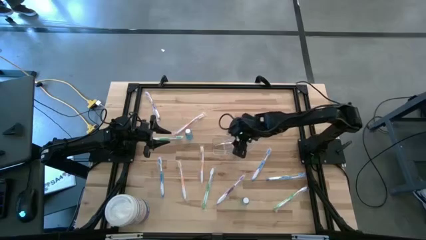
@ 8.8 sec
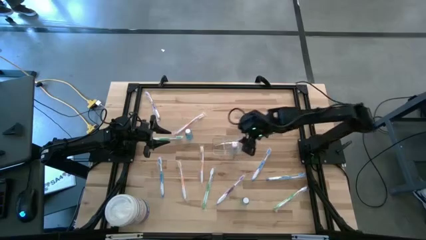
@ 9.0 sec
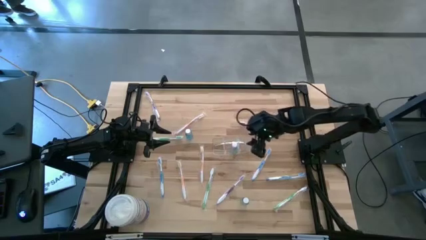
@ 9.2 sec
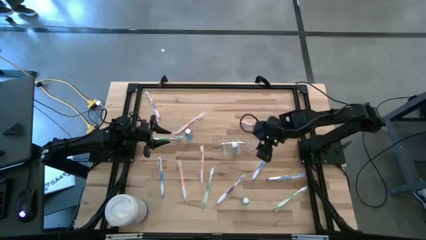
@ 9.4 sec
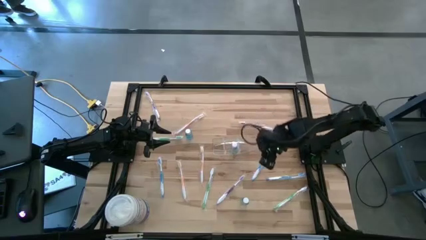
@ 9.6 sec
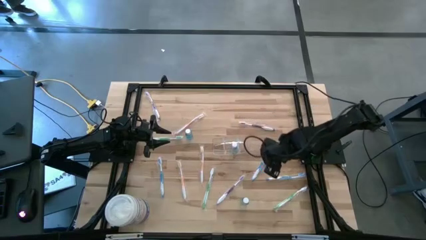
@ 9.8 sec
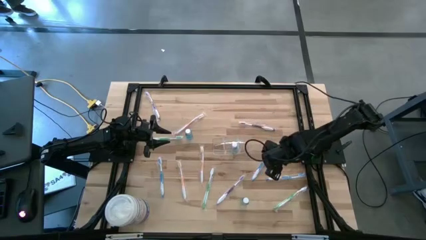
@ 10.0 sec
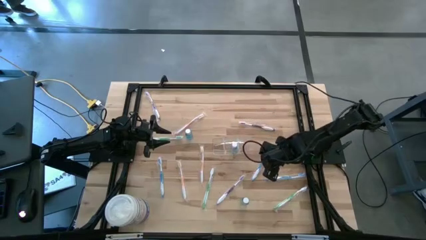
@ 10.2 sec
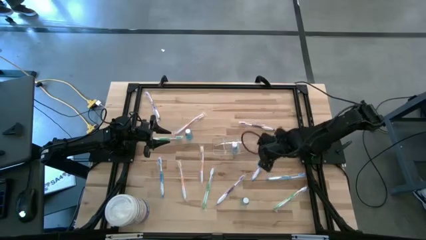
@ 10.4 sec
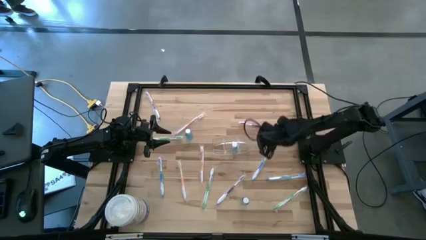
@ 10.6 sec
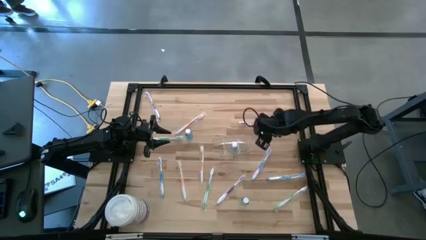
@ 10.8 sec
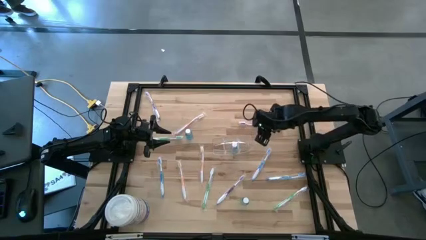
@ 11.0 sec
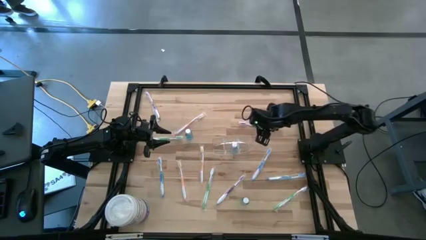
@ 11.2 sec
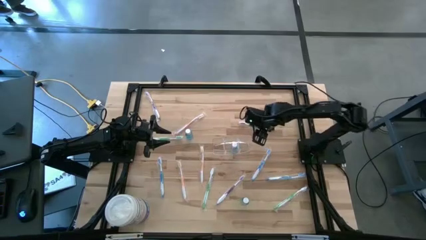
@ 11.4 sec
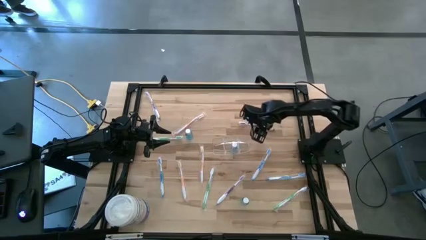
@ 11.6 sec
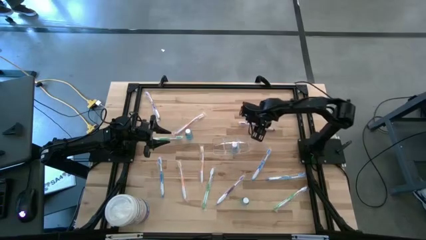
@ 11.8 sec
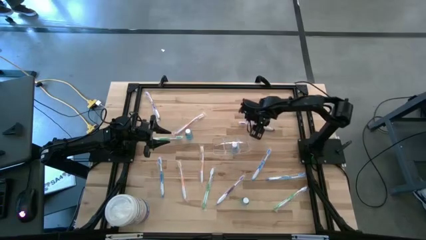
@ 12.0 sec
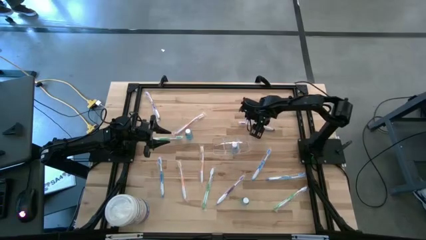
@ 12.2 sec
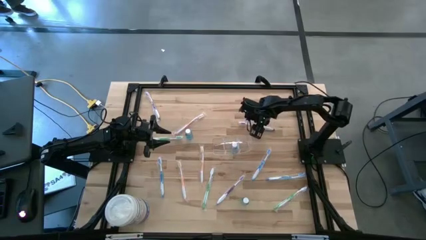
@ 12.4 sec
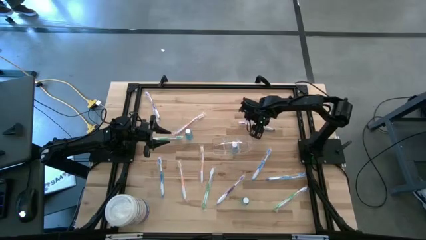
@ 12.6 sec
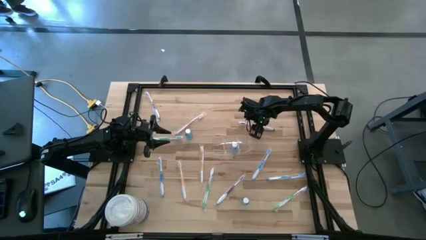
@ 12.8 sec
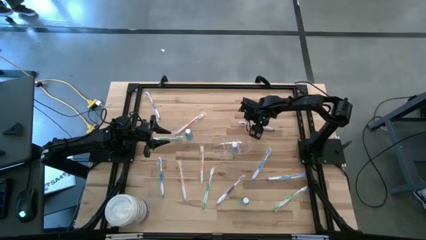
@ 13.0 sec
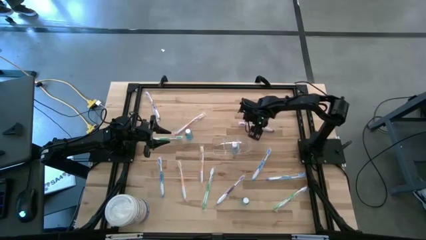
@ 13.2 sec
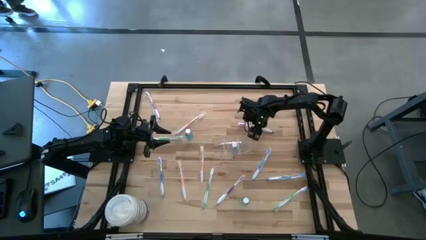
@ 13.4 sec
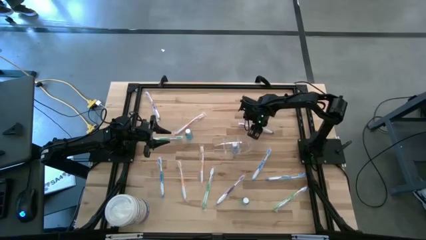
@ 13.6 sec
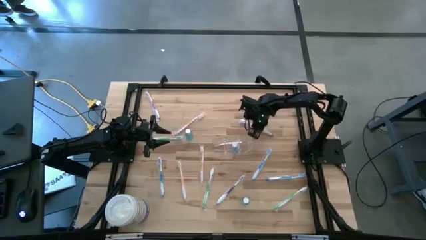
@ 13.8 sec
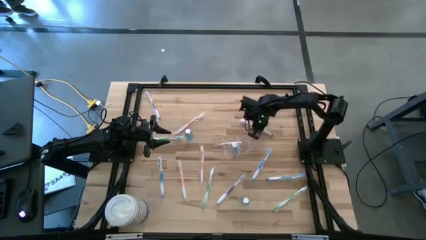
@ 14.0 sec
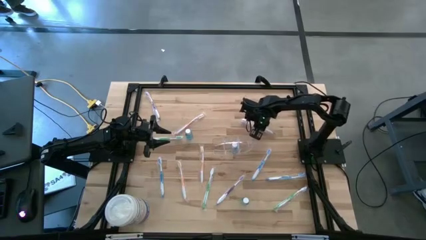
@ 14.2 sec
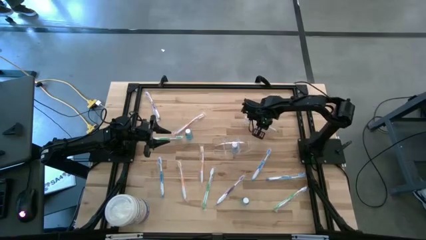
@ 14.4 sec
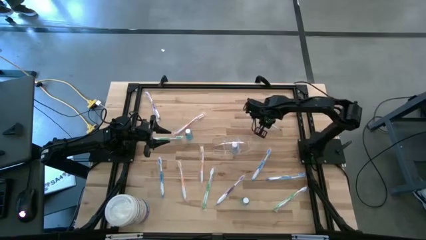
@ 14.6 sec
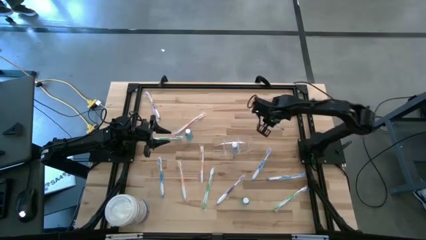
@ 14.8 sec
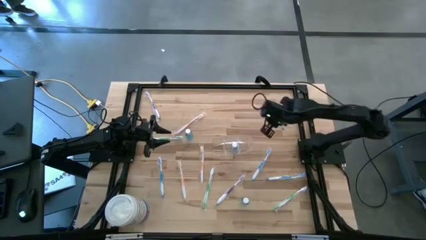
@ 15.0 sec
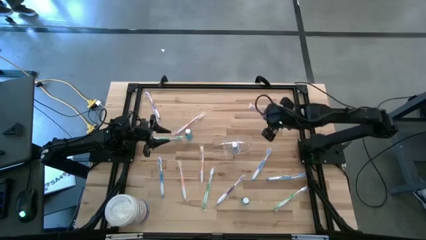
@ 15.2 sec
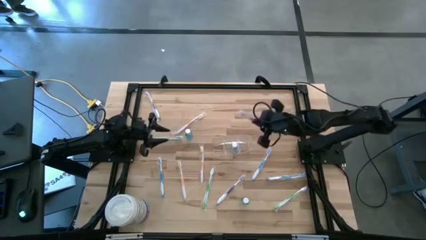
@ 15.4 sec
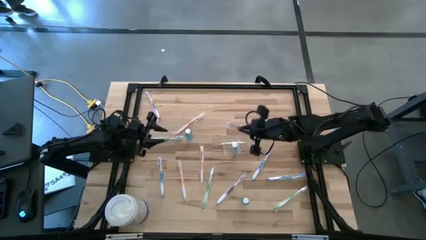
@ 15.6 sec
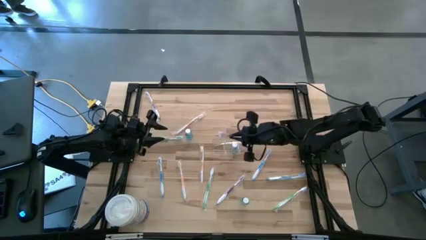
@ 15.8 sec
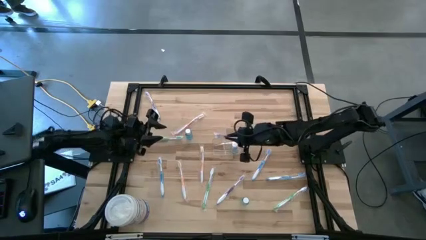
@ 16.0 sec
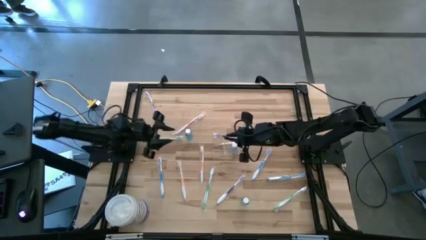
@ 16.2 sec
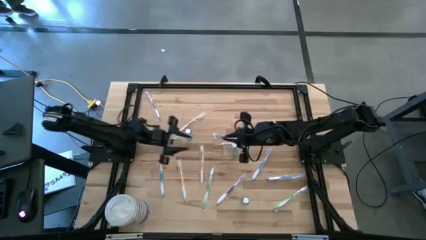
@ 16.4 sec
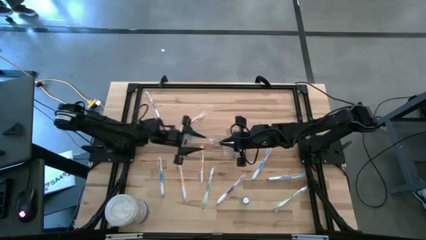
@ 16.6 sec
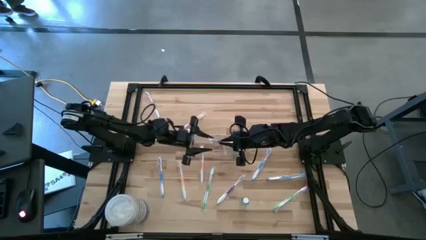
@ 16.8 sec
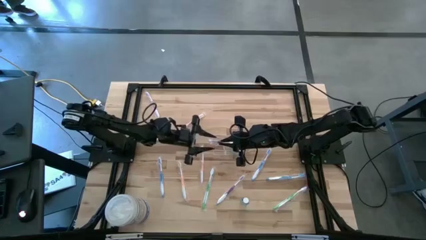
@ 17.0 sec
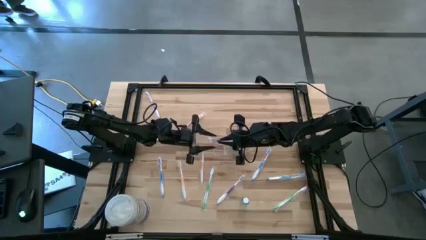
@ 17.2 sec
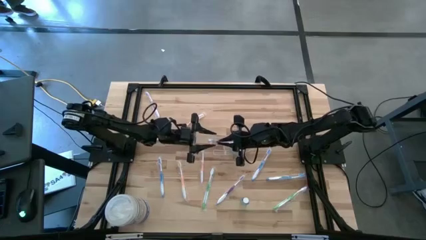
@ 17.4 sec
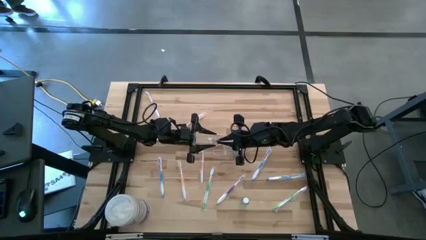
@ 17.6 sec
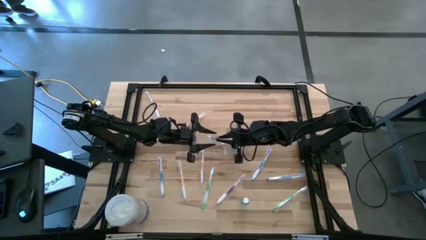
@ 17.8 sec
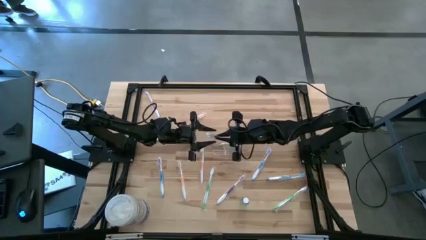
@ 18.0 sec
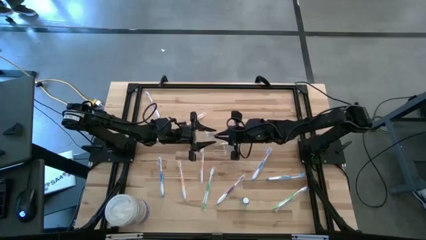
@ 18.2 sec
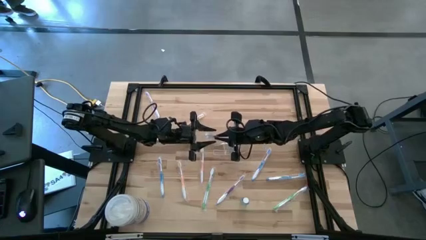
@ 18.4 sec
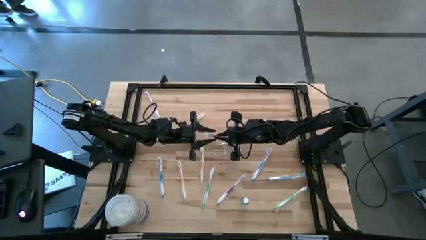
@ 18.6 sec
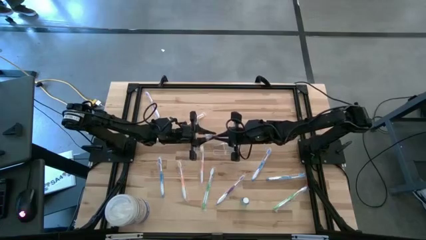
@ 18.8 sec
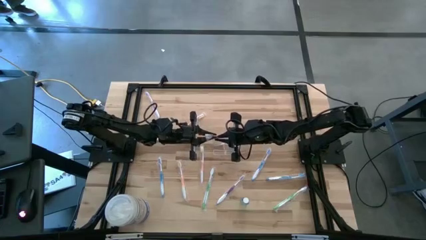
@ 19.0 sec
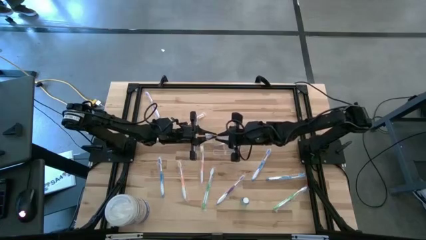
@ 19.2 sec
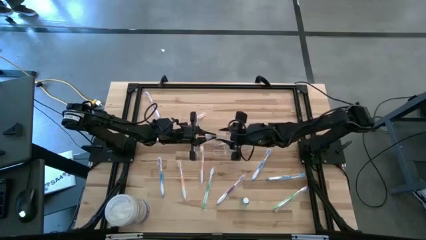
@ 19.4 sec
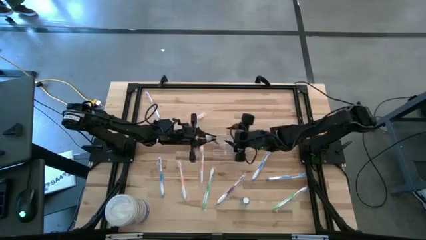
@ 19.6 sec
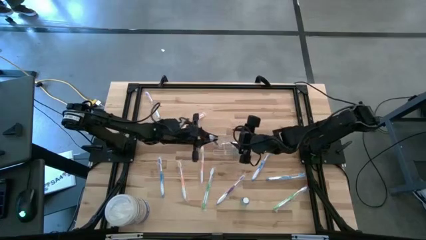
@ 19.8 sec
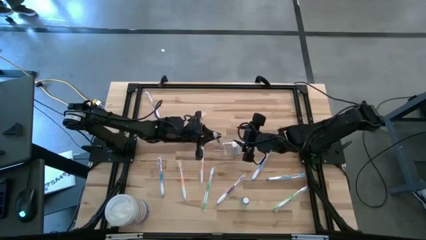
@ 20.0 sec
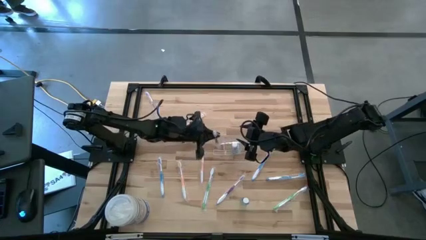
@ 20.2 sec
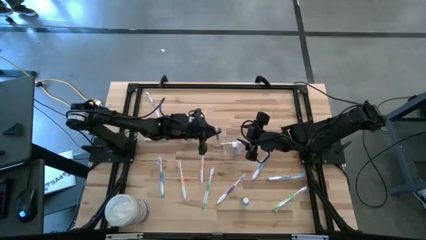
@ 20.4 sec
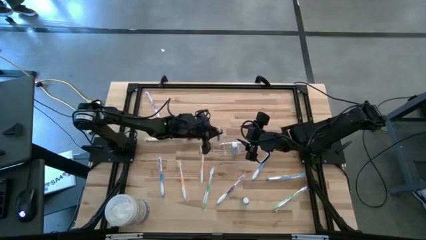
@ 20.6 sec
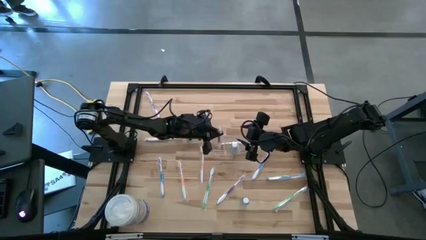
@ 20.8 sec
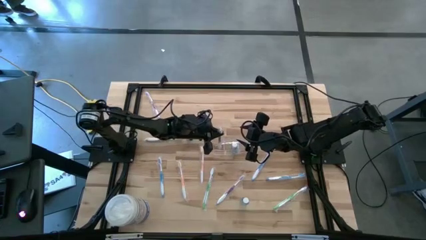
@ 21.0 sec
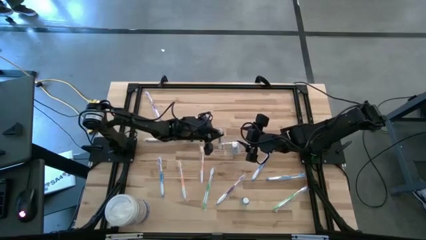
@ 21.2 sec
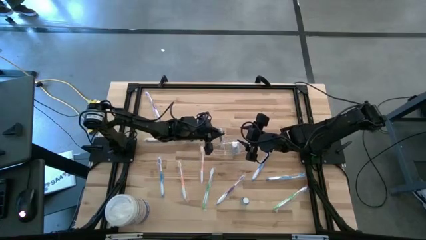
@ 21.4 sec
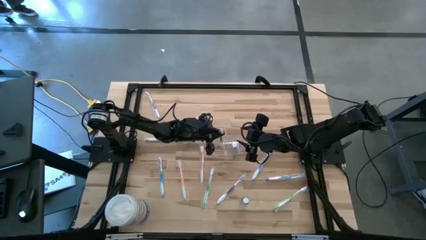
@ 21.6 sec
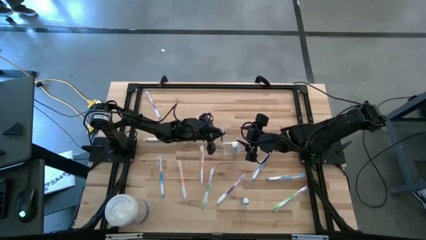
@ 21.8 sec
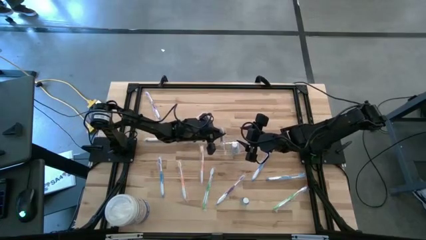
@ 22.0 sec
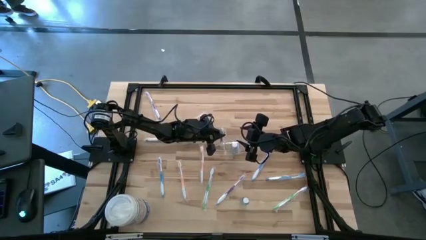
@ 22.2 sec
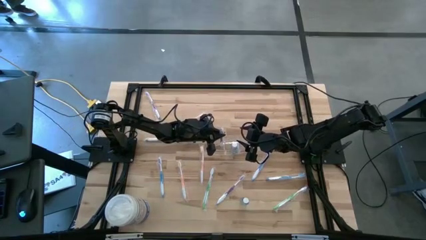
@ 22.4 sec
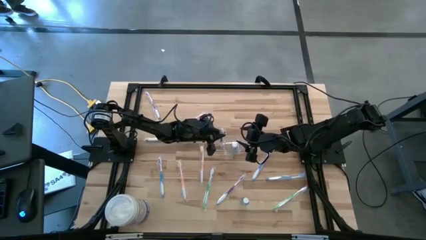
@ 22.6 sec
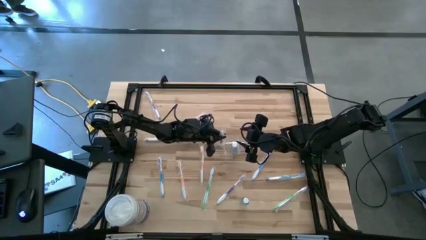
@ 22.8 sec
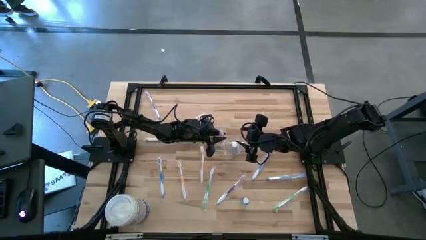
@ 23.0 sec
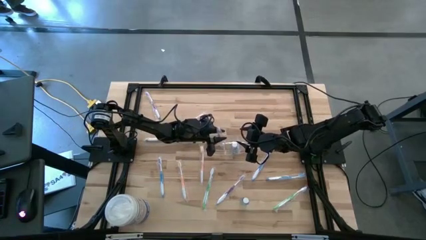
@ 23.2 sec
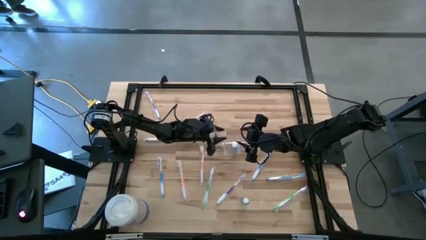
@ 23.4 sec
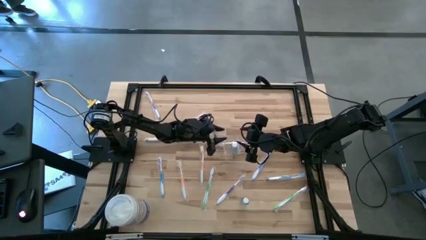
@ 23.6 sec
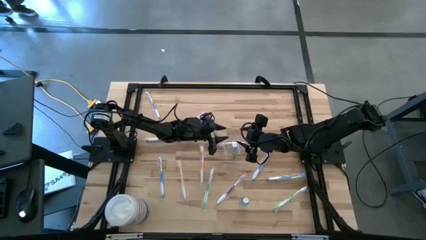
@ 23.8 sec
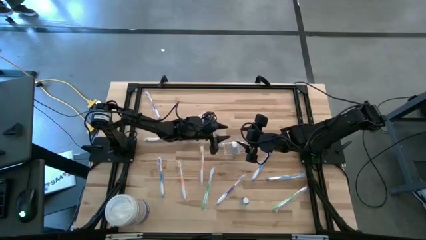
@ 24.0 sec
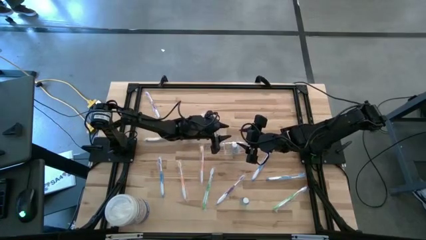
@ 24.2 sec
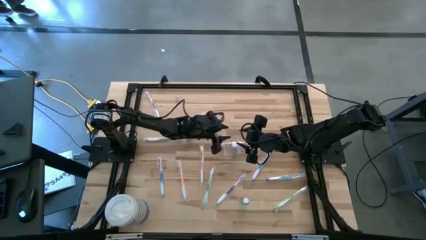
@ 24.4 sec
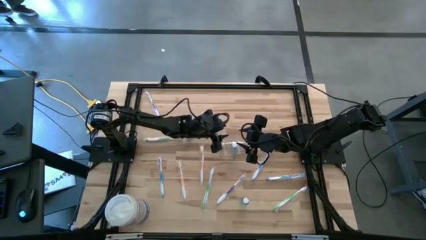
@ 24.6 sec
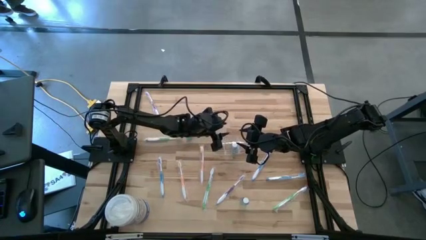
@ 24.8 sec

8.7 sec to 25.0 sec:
Task: Pick & Place toothbrushing station
Put the top right violet toothbrush into the wire organizer
